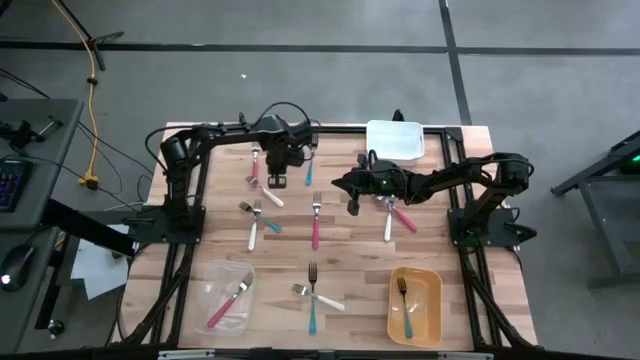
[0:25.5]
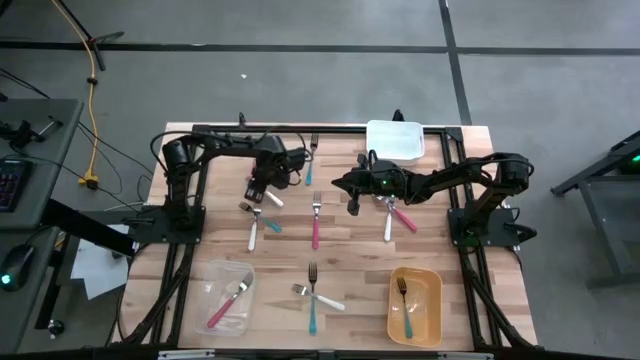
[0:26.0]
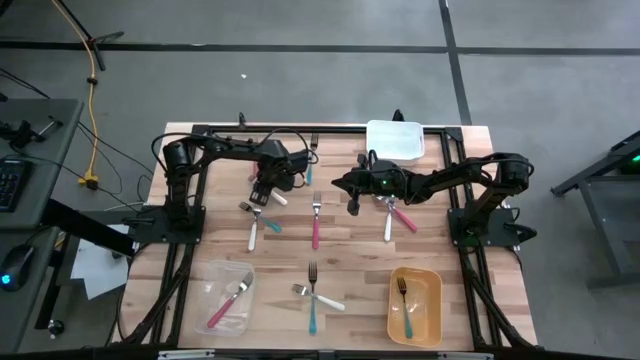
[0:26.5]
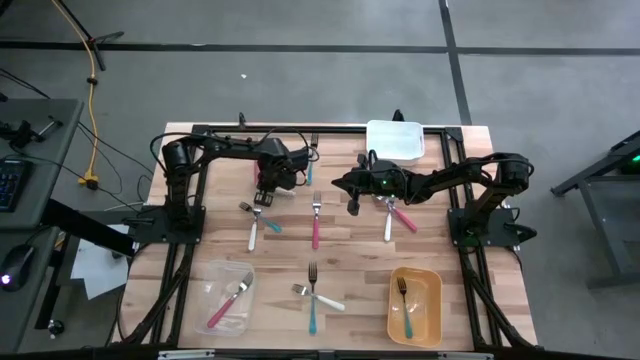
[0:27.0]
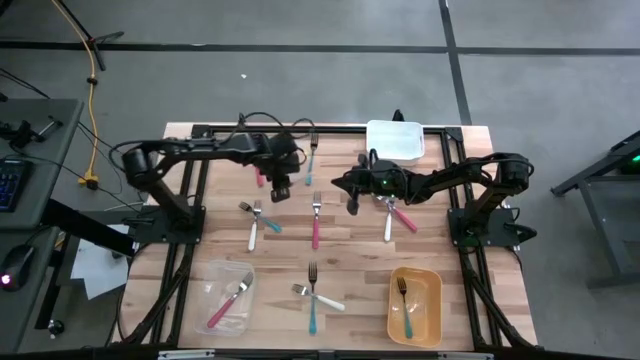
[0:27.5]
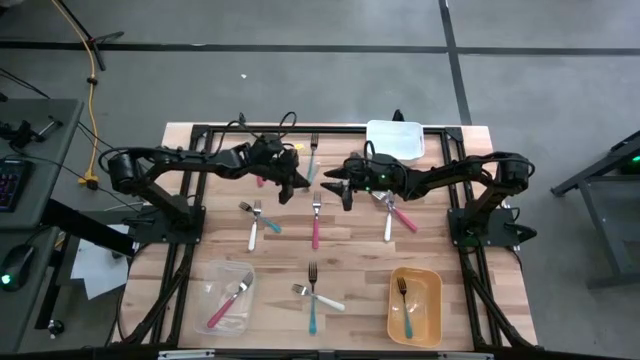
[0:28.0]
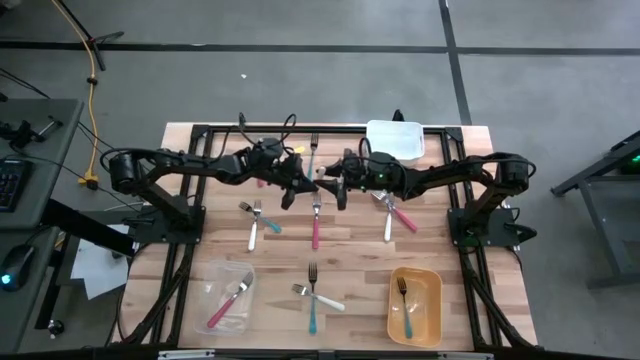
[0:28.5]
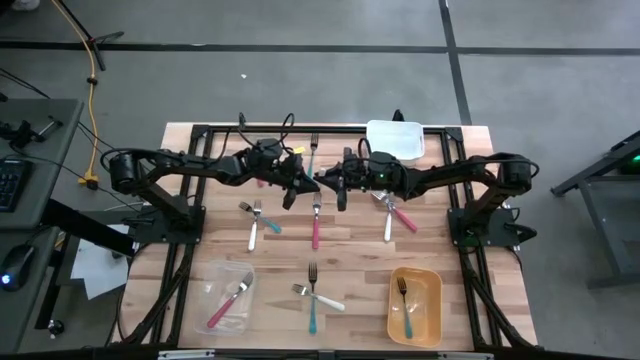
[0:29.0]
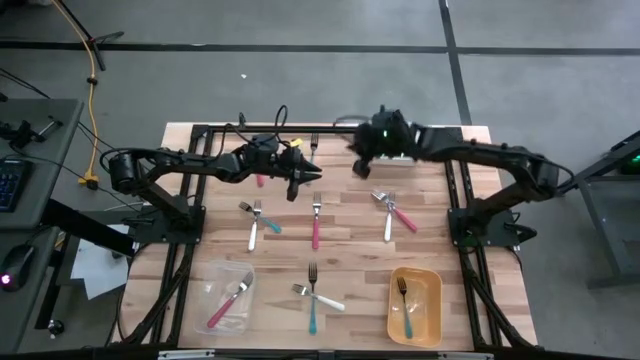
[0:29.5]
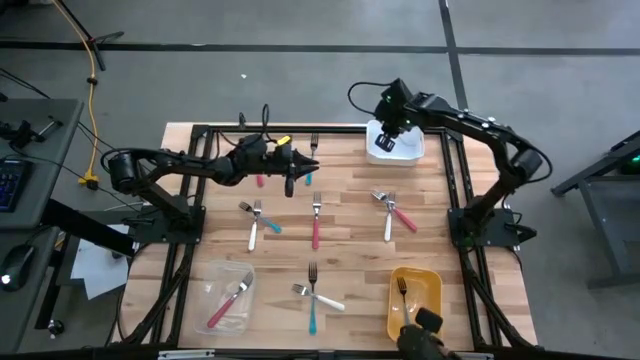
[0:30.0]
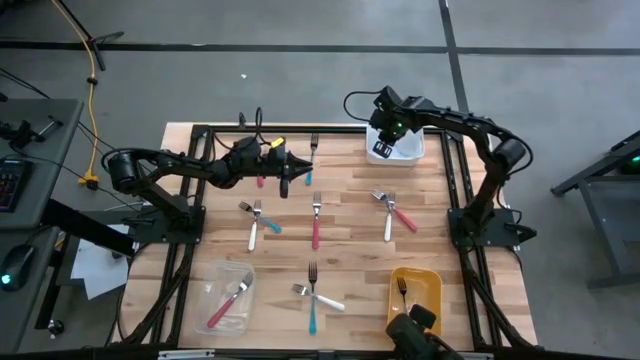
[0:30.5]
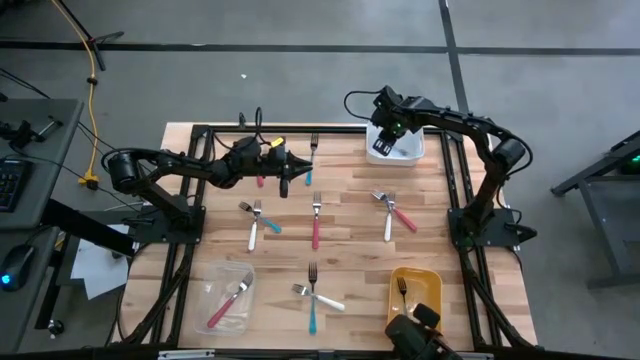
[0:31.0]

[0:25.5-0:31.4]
Task: Sort silverware by color (type)
Put the top left white fork into the white bin

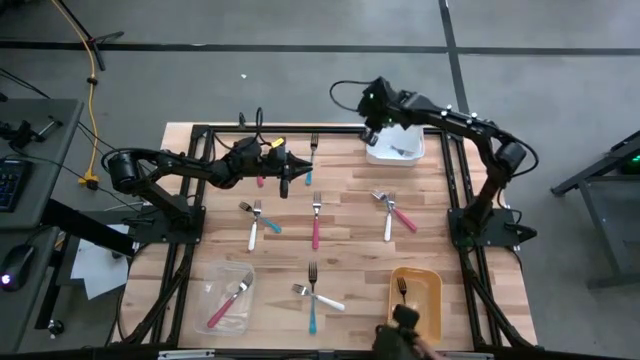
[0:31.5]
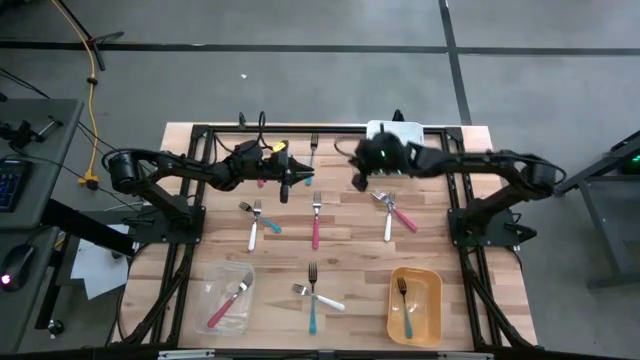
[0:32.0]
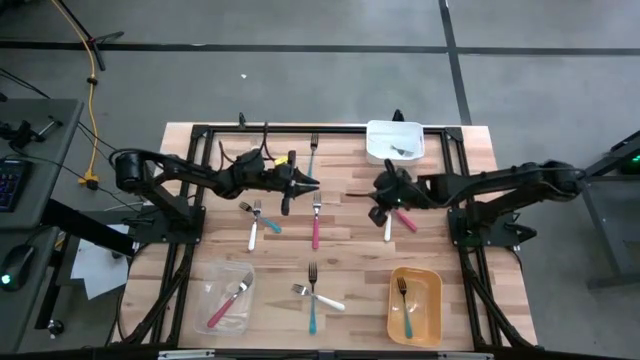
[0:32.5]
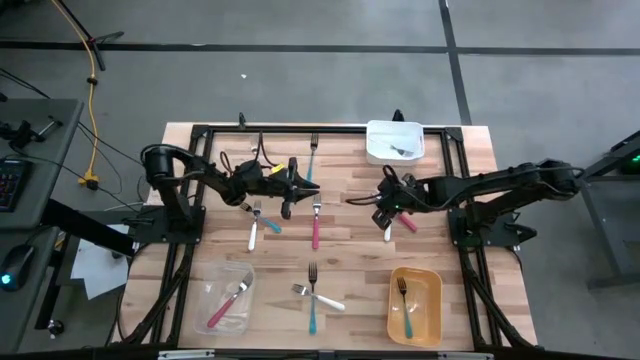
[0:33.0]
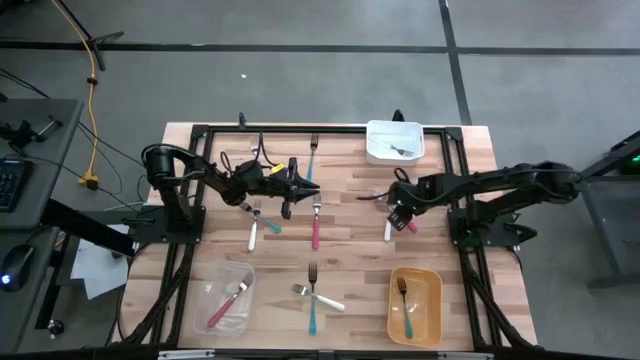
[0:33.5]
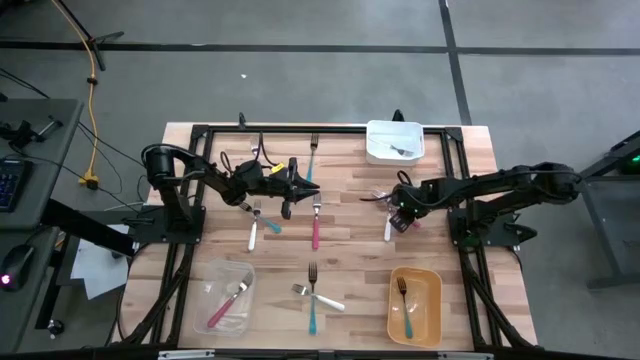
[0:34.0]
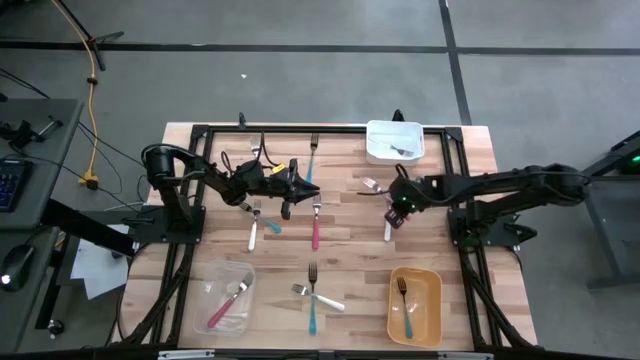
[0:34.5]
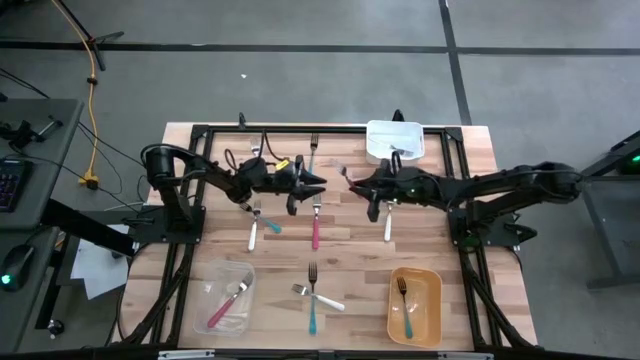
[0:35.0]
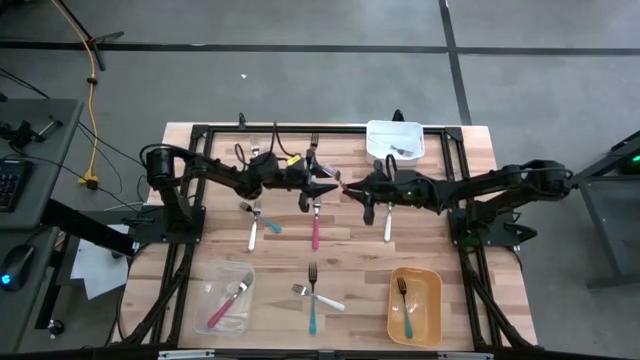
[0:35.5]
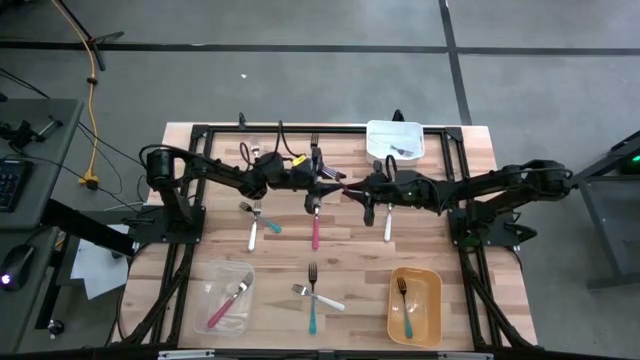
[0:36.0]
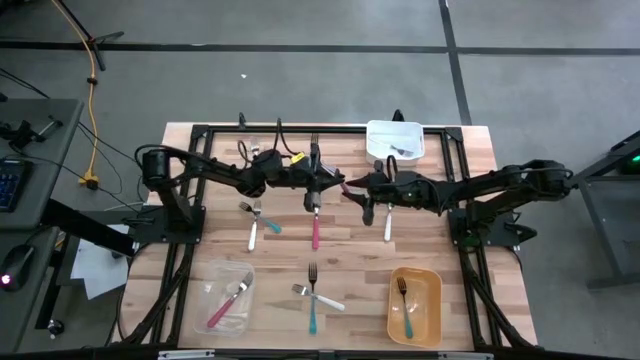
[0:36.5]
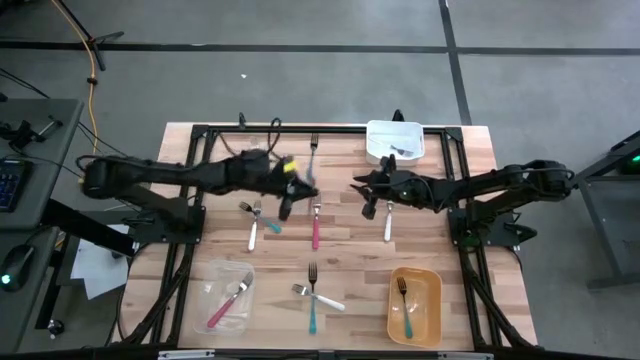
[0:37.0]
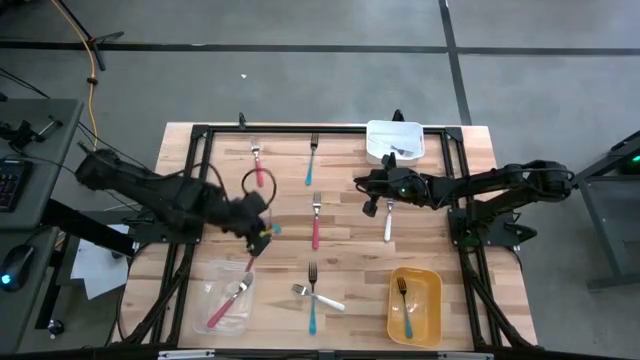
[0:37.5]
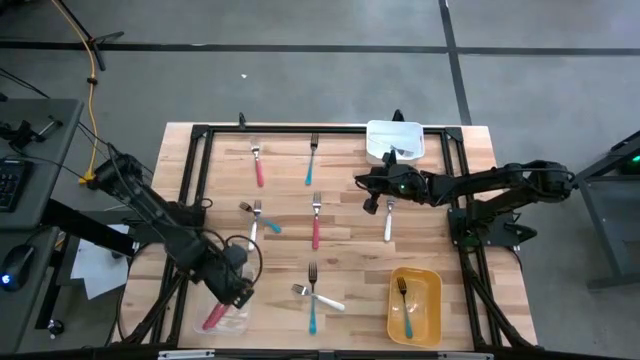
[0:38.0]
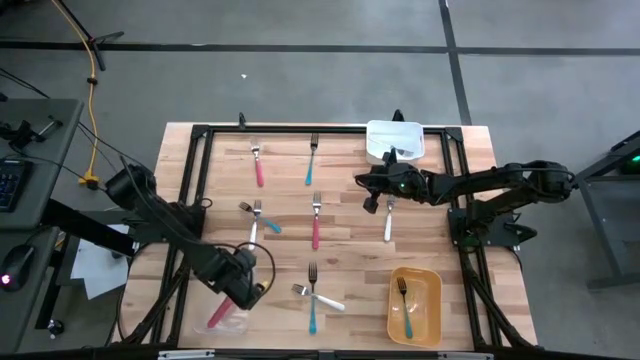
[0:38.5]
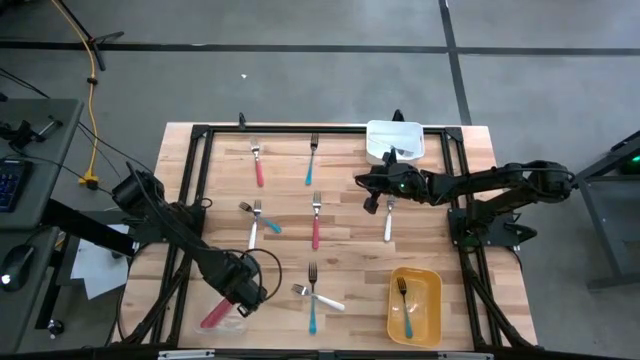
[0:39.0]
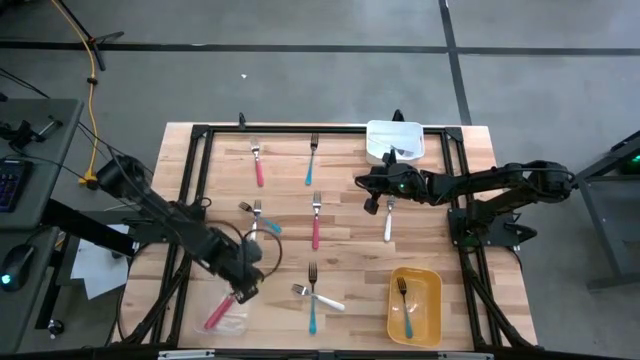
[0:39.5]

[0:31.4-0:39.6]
Put the middle right pink fork into the transparent bin

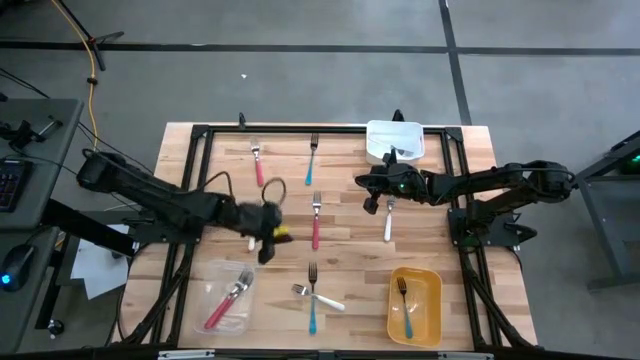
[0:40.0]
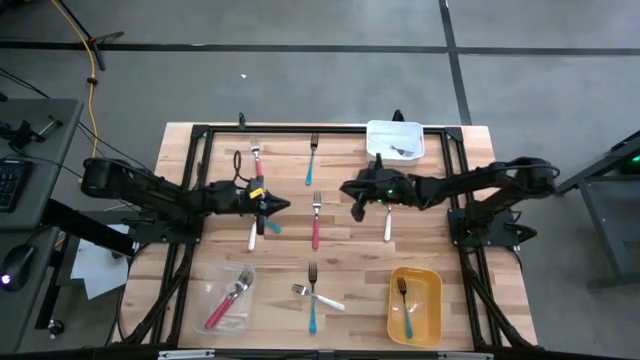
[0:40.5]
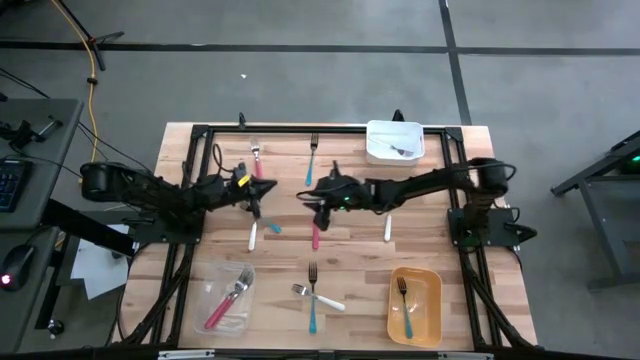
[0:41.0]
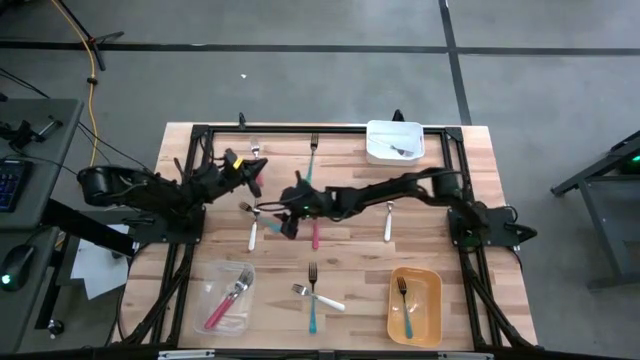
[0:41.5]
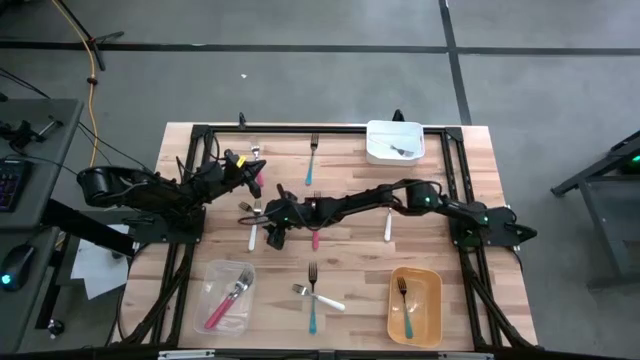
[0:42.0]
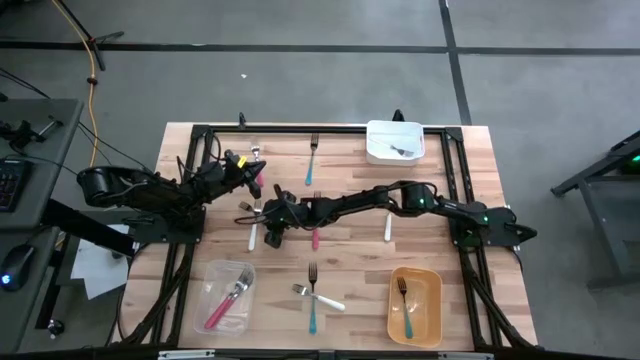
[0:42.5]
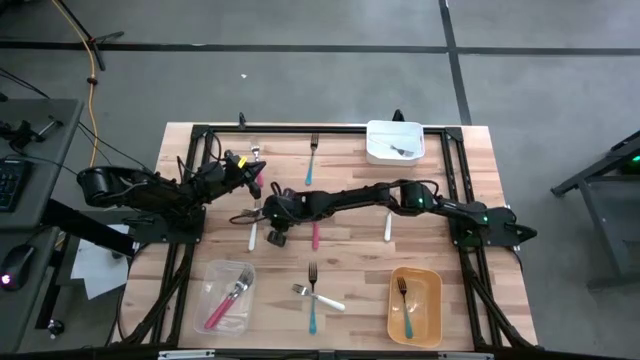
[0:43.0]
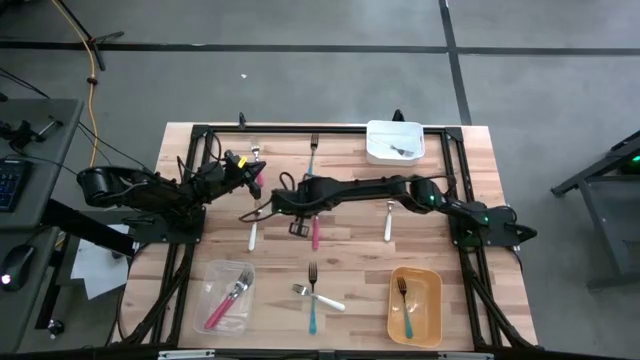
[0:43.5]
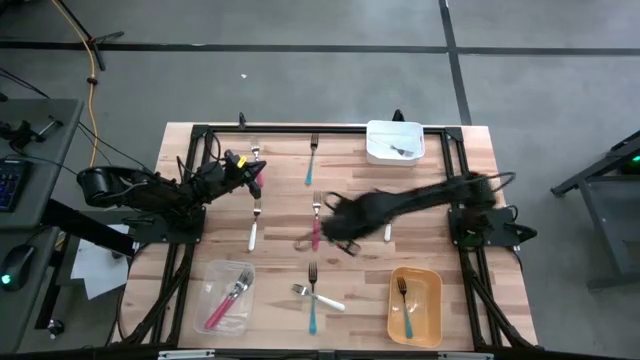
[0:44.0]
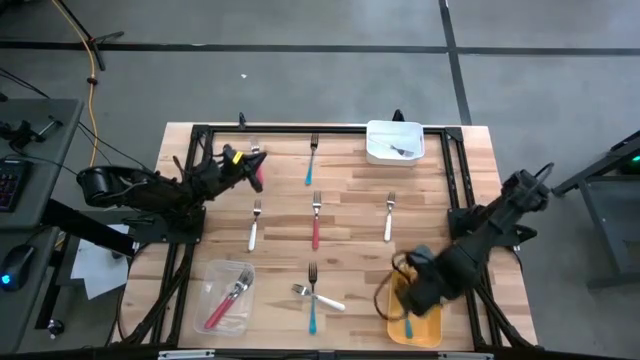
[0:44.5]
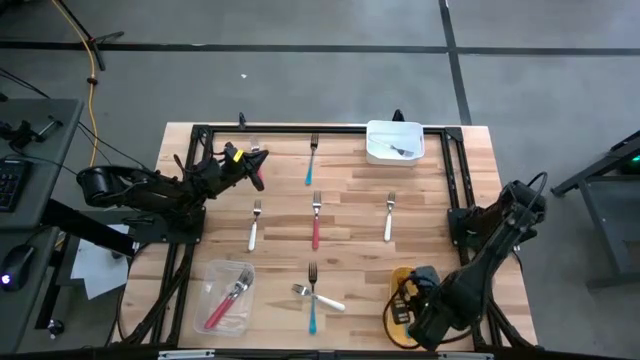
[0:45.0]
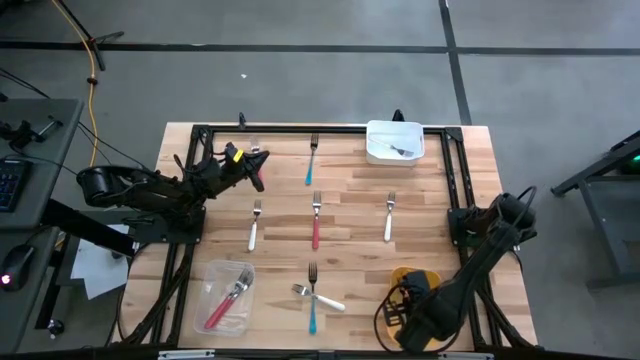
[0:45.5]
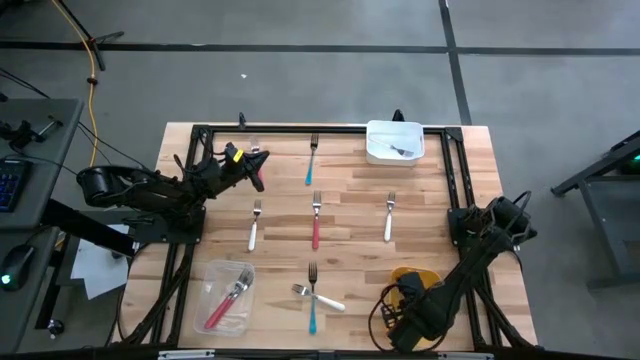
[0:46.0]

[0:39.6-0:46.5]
Put the middle left blue fork into the yellow bin
